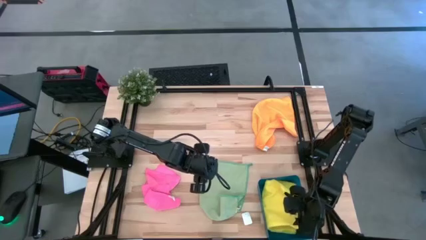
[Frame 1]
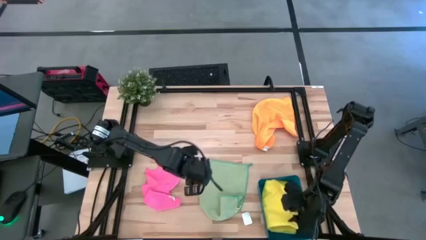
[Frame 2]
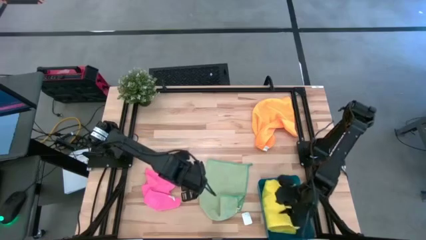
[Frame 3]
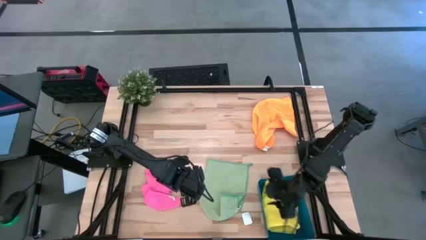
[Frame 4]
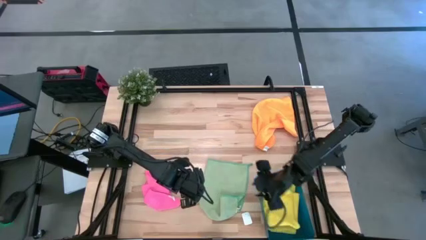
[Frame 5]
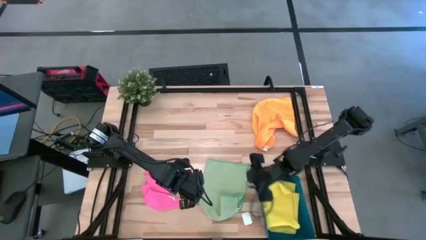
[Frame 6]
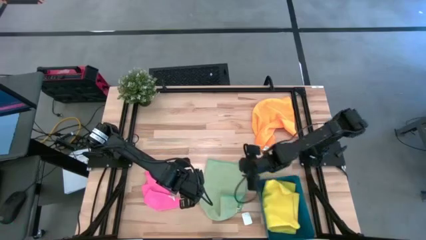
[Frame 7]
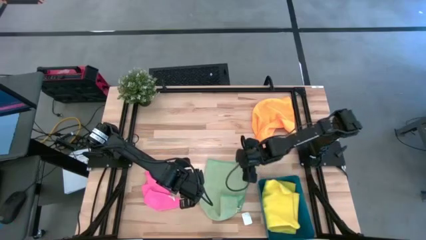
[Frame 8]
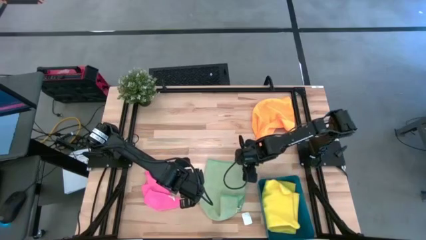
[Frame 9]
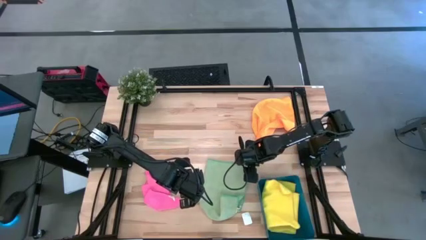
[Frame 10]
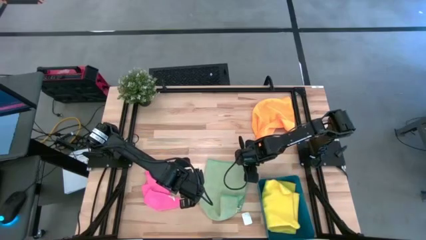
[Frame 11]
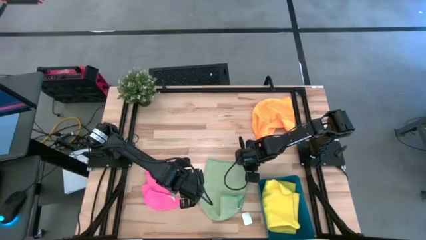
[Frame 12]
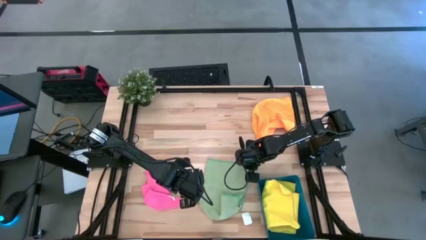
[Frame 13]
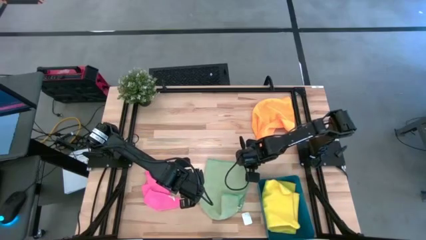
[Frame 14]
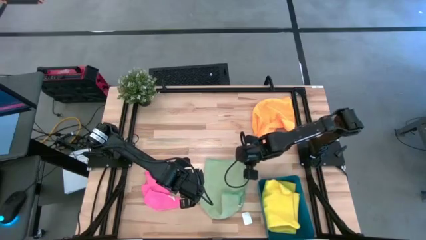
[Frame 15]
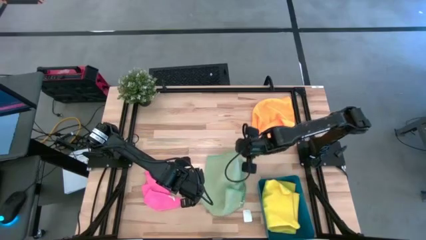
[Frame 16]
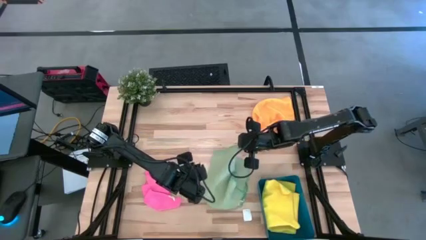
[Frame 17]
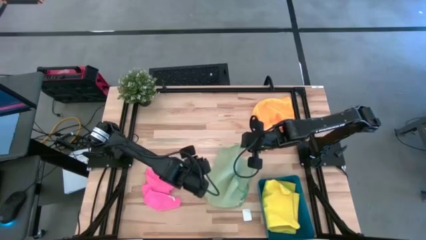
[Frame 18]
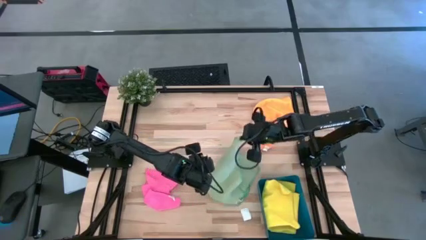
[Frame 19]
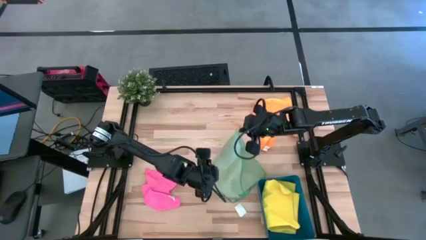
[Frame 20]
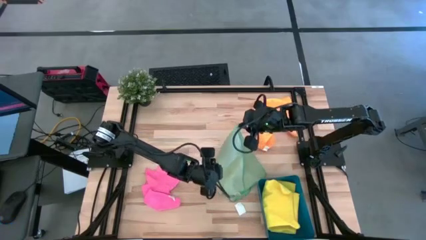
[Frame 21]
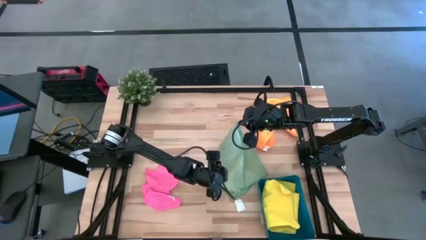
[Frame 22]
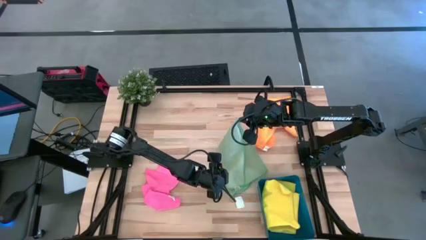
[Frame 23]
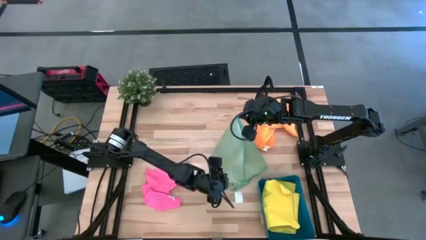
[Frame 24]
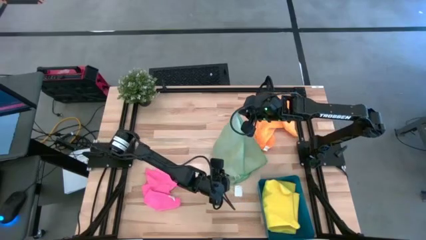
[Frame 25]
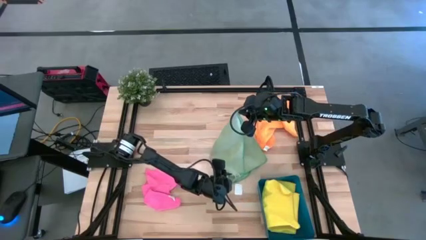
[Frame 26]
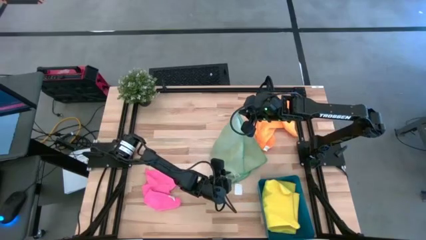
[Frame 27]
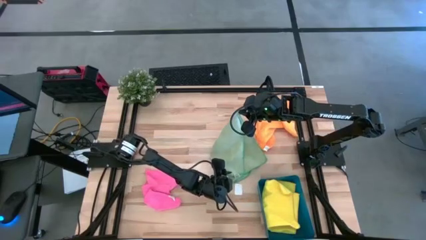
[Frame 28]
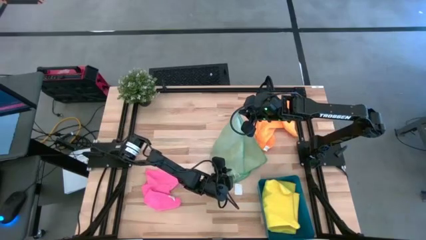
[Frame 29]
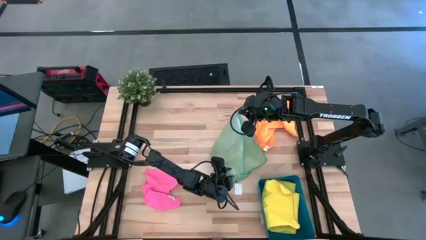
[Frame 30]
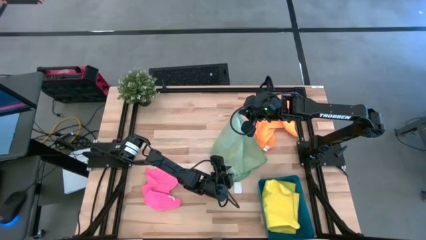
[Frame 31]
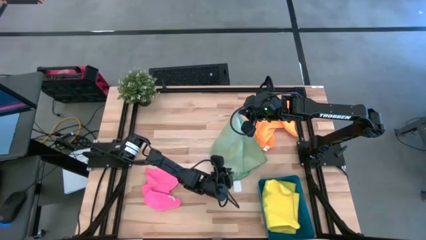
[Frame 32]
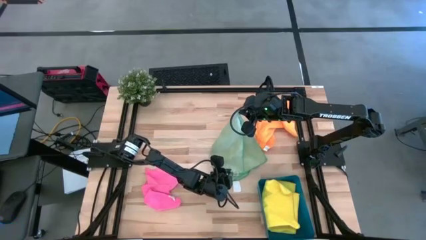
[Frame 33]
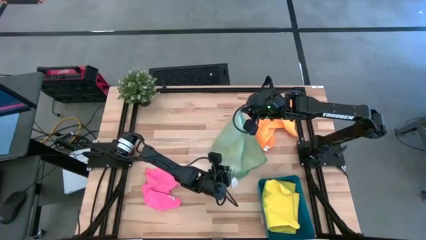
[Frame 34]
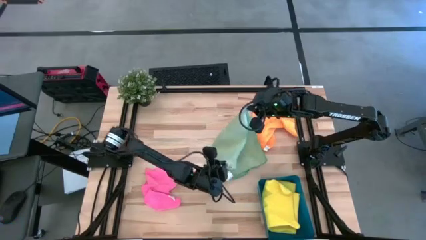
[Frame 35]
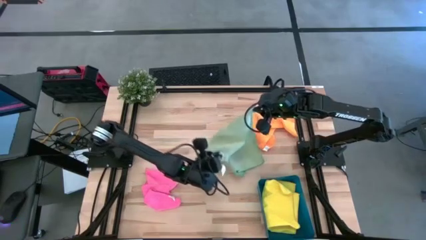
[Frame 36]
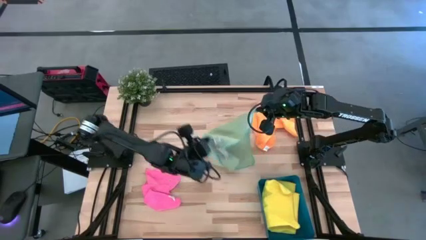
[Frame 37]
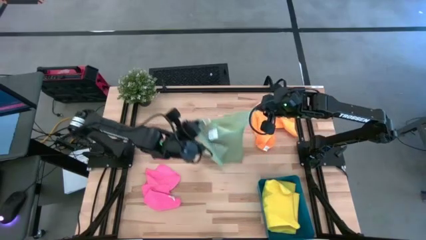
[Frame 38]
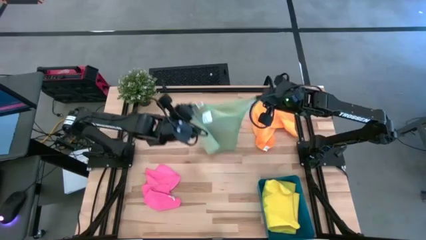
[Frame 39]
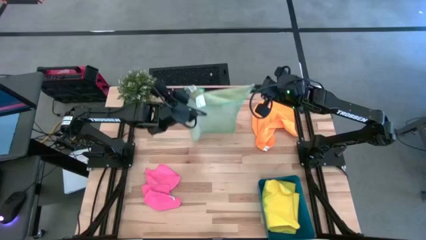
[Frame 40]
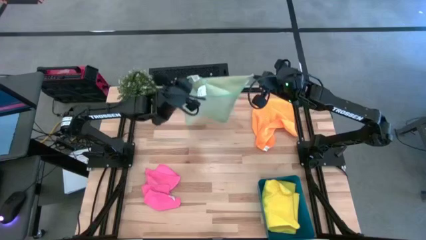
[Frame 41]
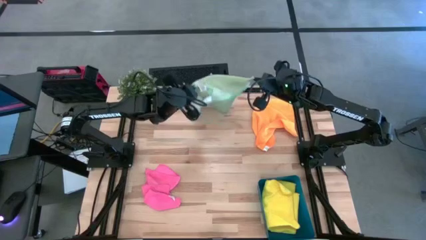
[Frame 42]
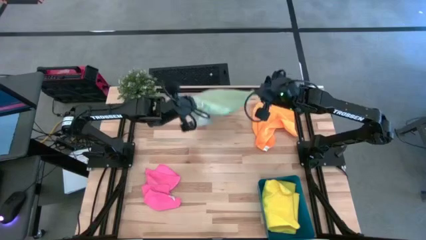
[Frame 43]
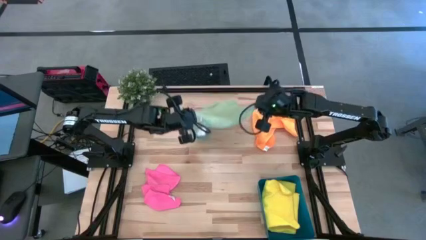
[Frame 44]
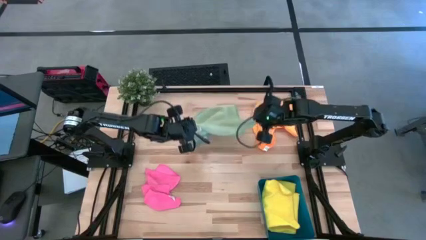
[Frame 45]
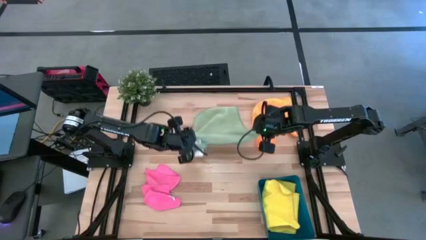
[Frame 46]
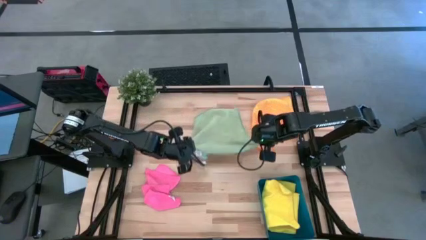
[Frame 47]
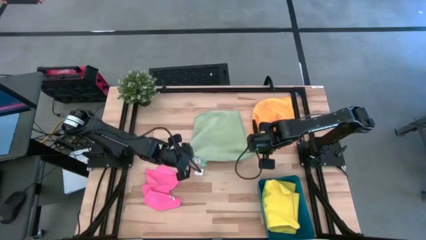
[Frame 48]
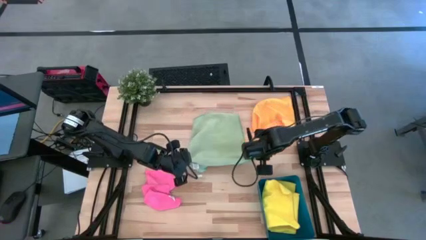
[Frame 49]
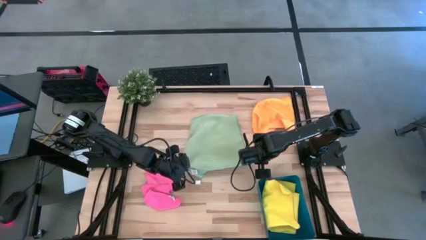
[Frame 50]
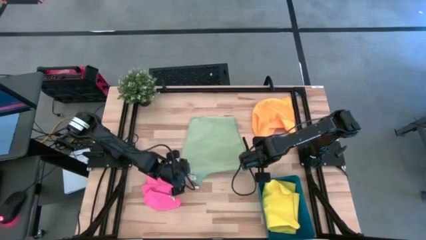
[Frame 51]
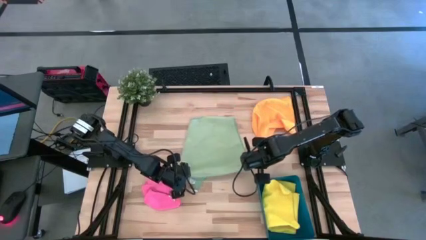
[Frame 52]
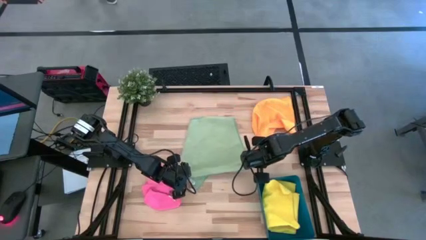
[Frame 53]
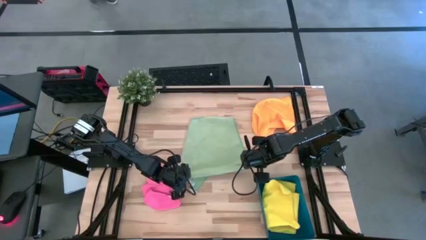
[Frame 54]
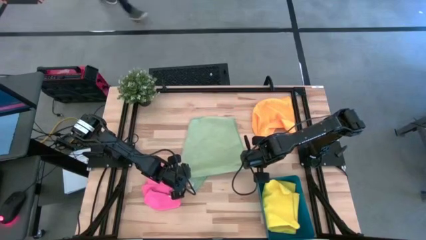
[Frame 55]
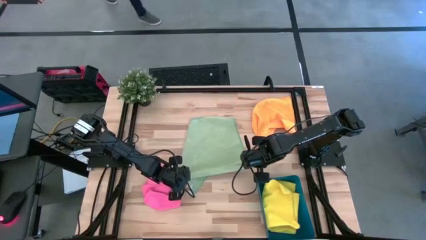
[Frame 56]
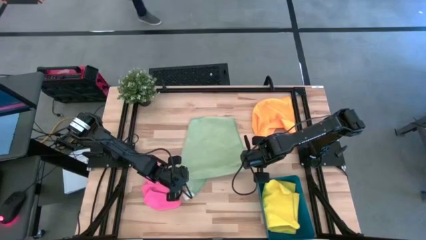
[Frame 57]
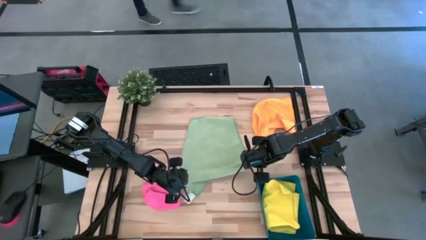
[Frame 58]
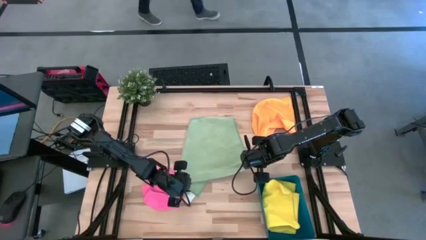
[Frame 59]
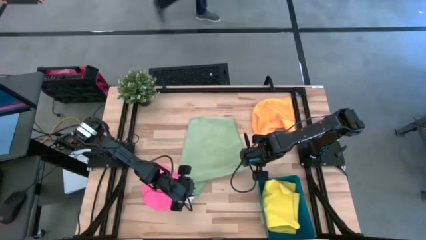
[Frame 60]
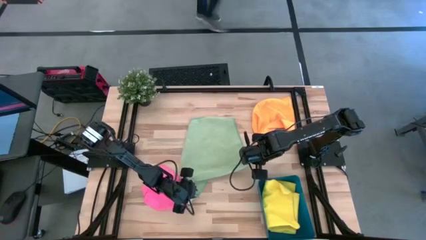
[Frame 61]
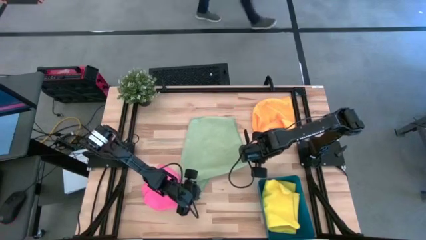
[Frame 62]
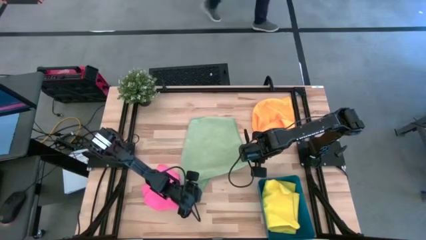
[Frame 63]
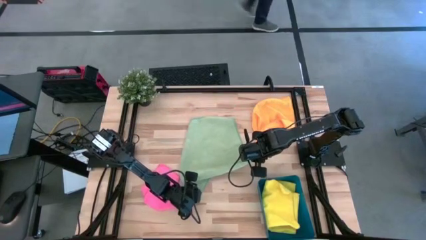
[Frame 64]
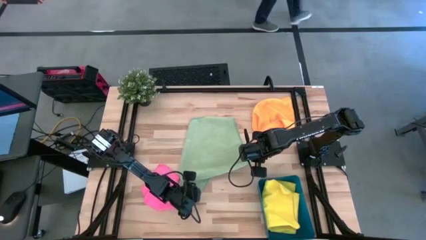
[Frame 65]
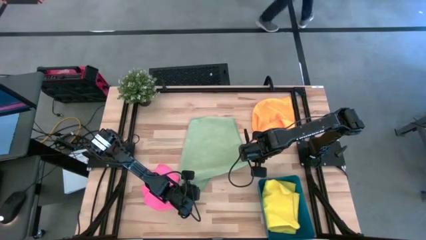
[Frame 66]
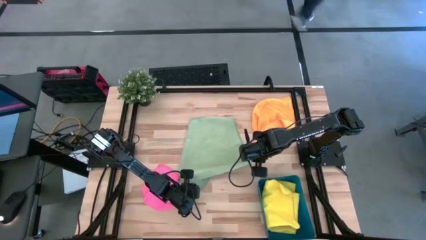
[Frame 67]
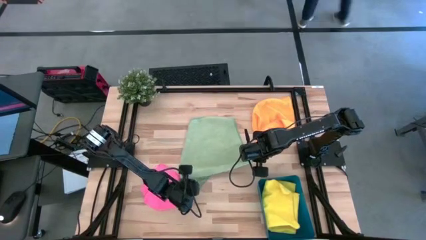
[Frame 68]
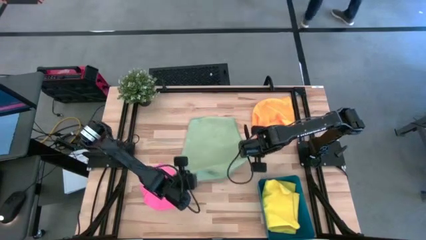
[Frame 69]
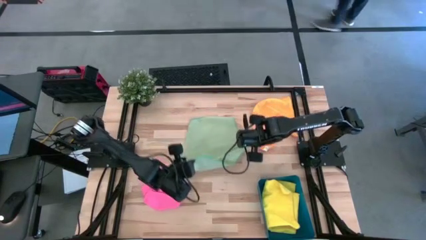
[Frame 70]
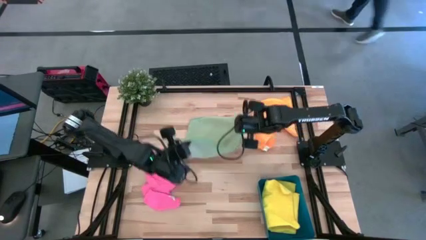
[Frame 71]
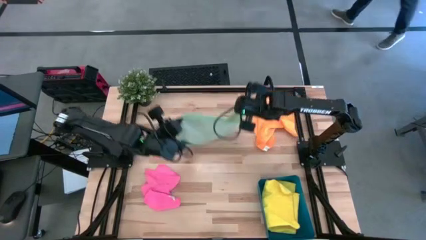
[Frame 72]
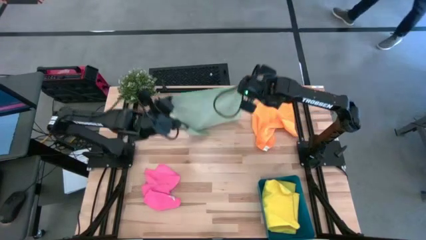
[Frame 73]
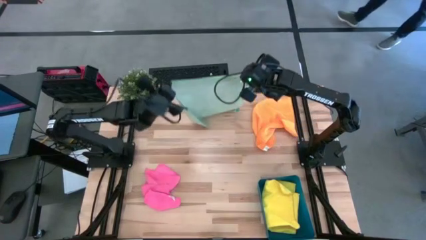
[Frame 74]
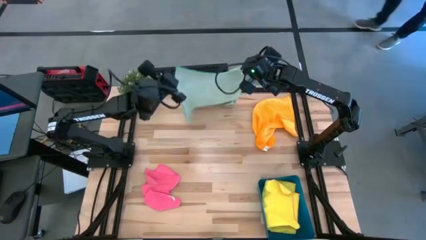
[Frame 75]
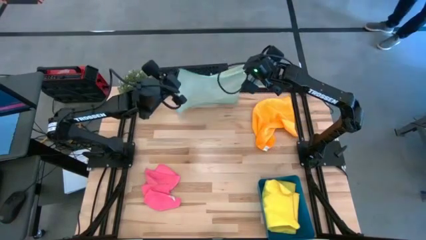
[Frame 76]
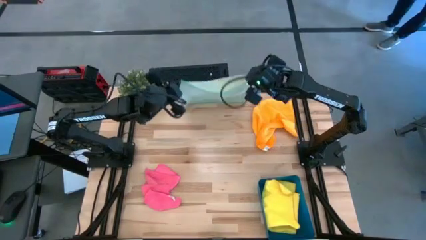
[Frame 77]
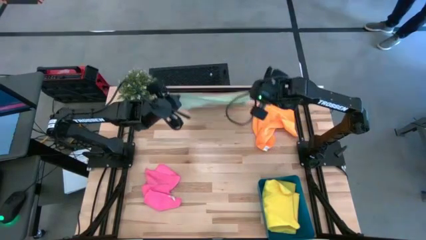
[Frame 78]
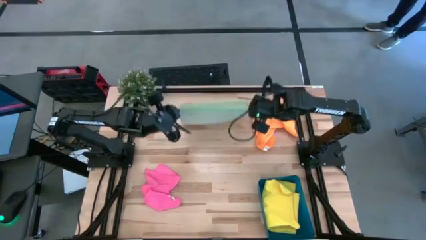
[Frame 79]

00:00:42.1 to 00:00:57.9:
Task: Fold microfiber towels
Fold the green microfiber towel
